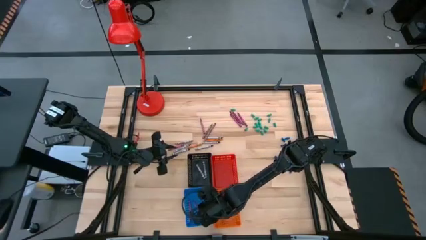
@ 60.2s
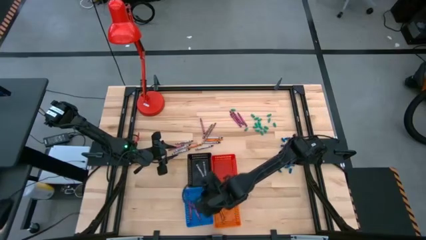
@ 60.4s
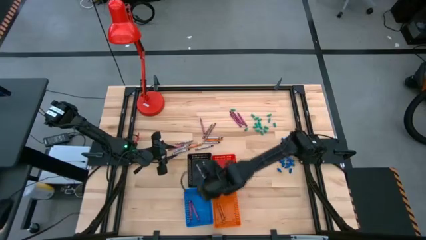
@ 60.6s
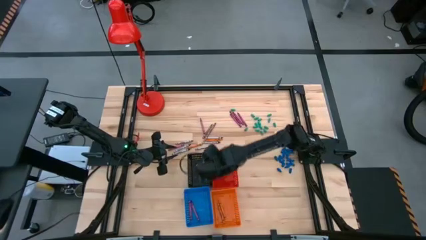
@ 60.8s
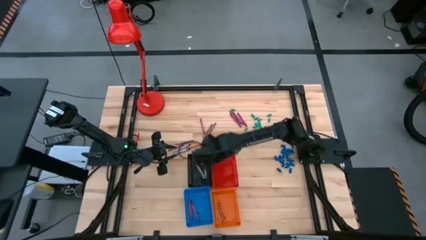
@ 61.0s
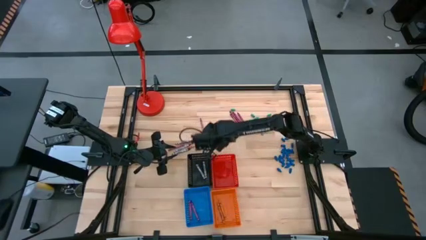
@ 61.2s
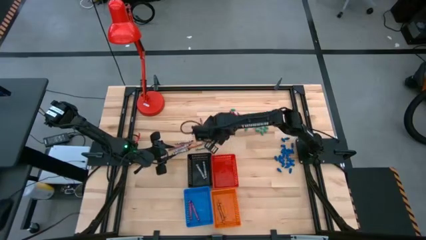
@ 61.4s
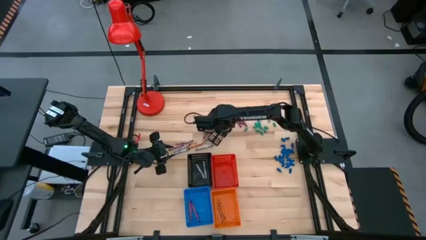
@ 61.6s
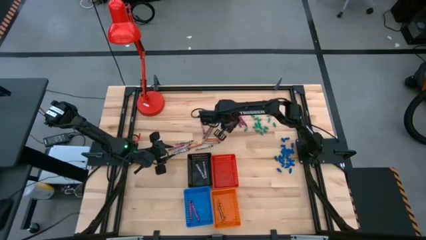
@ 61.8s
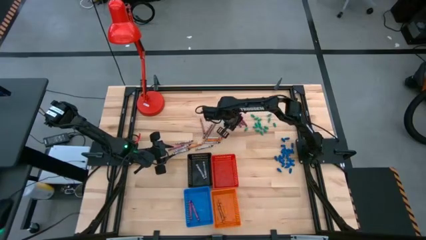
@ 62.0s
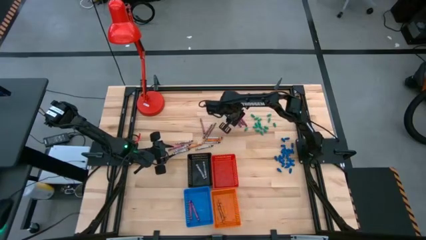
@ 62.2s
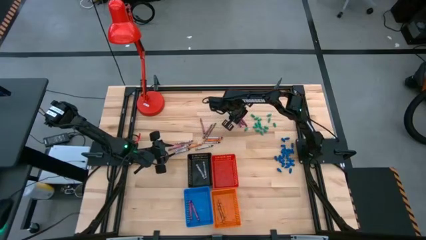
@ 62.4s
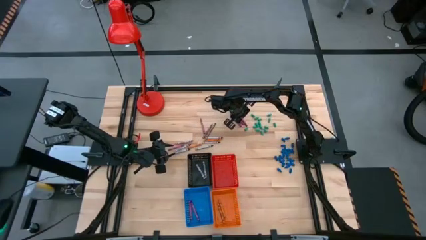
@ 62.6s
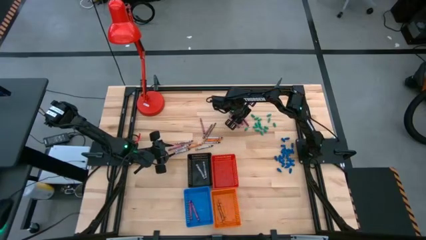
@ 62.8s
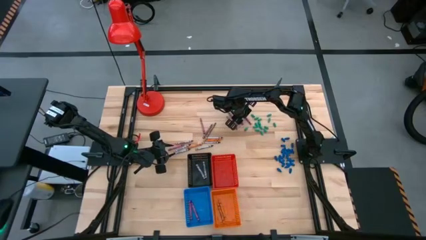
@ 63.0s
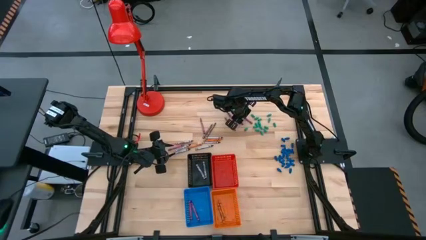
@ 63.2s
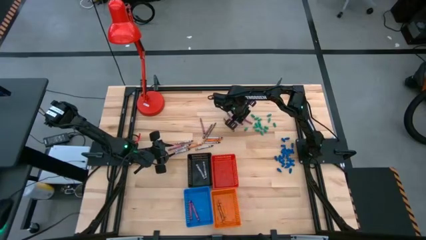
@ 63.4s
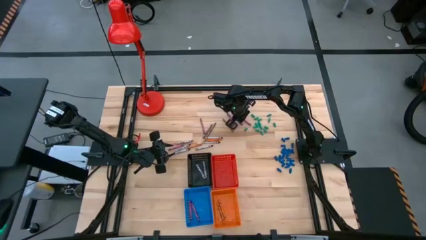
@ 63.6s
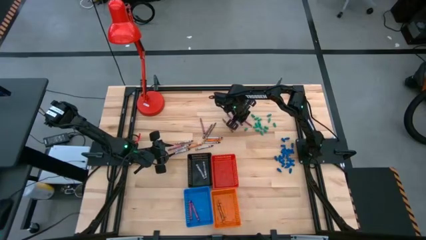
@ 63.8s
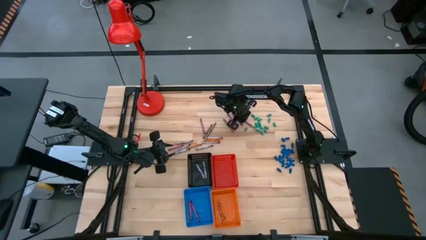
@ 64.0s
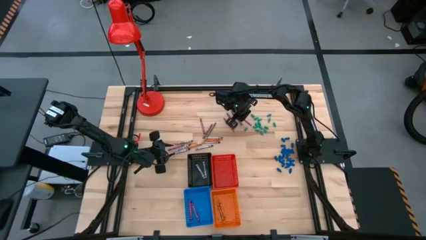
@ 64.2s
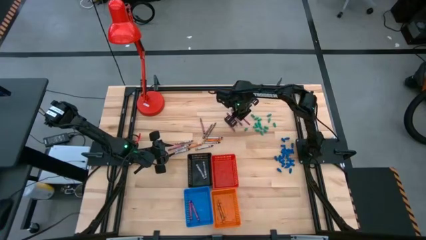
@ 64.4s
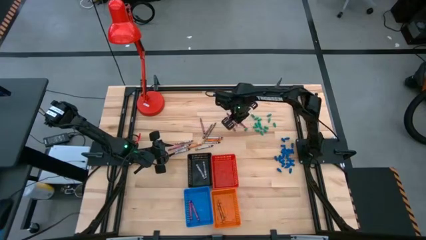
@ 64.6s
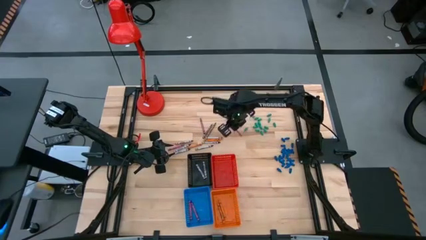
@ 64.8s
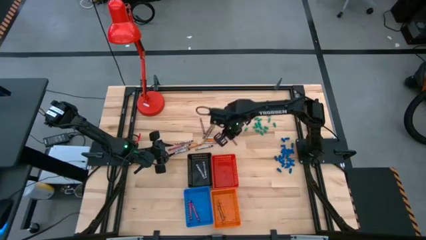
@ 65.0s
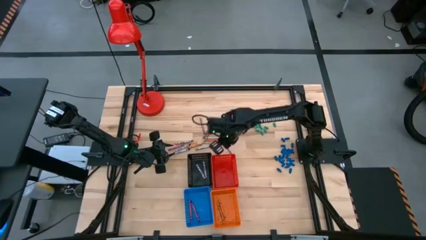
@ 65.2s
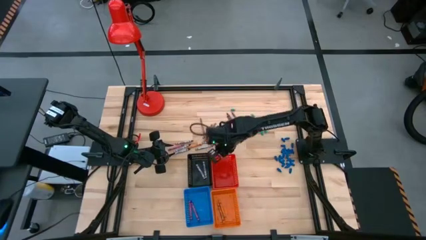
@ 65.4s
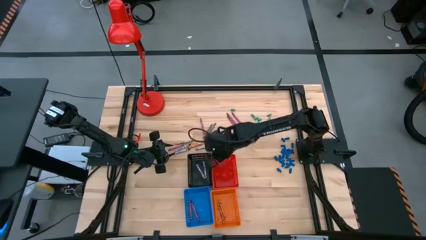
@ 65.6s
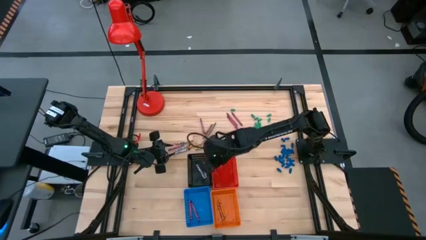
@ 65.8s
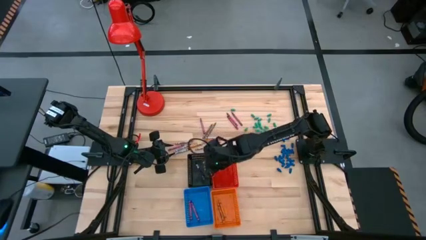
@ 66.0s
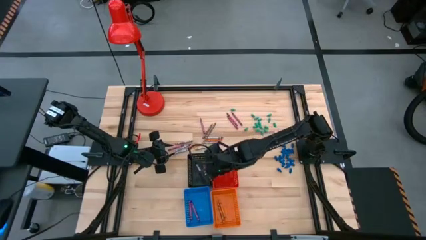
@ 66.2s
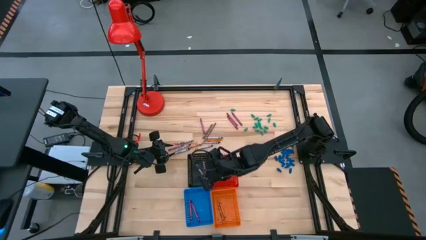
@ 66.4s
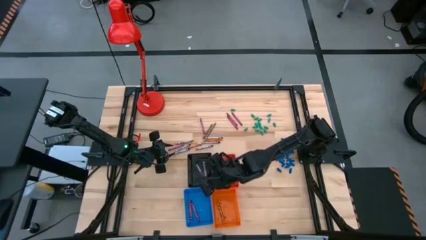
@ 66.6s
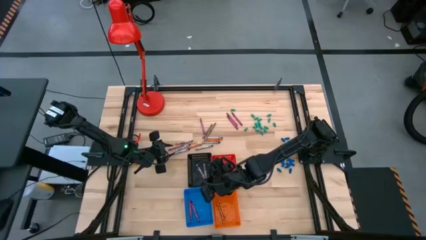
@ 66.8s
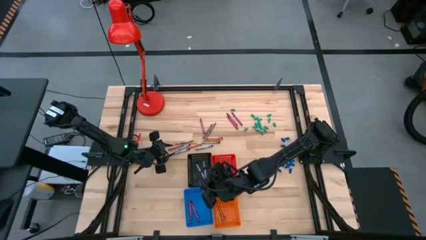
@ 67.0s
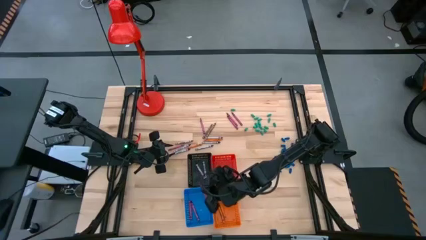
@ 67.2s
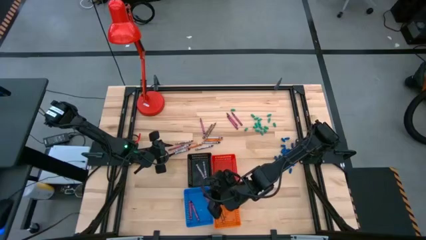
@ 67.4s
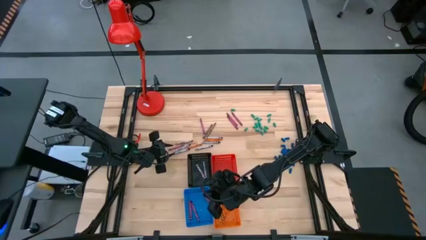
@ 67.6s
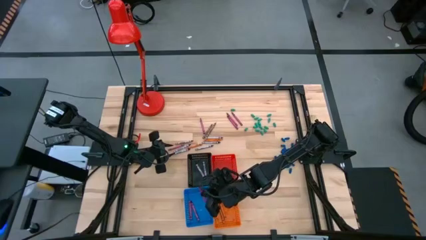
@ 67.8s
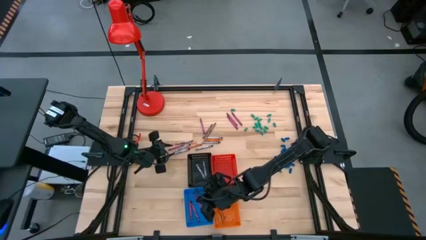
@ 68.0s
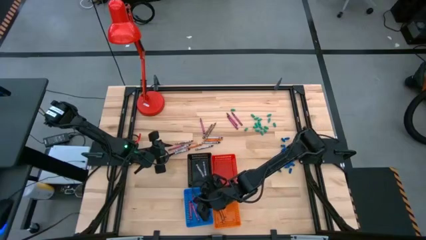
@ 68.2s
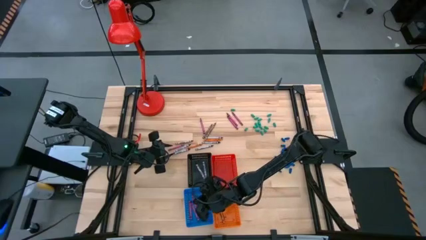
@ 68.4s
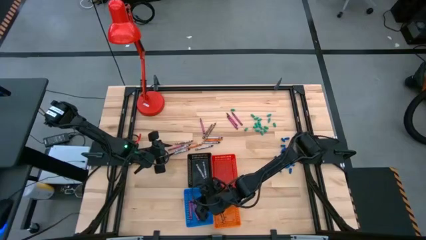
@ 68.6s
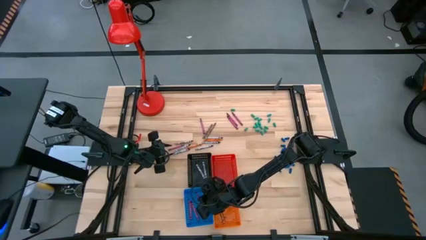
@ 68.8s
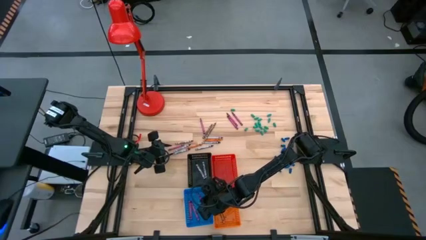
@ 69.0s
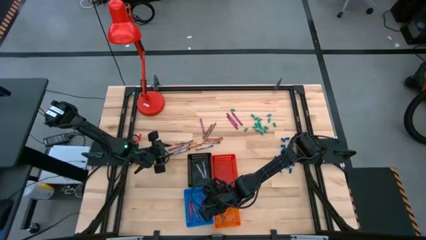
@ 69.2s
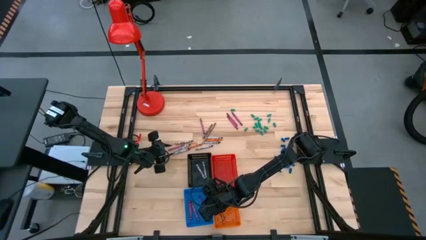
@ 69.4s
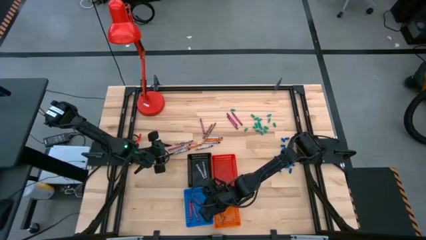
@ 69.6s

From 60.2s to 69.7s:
Task: Sort crayons
Put the red crayon into the blue basket

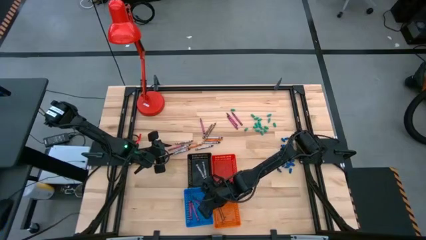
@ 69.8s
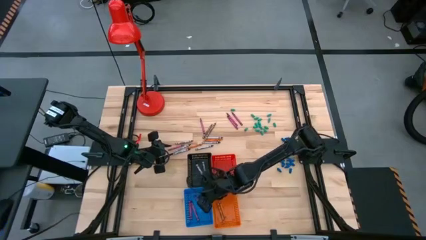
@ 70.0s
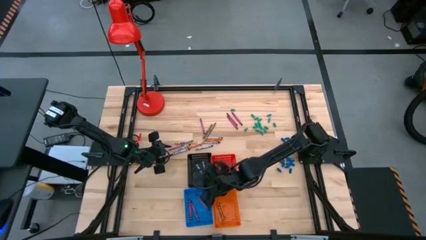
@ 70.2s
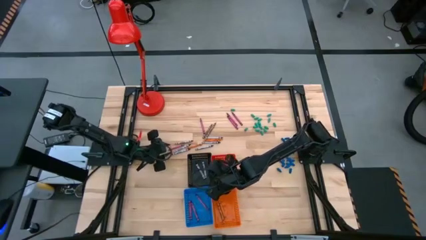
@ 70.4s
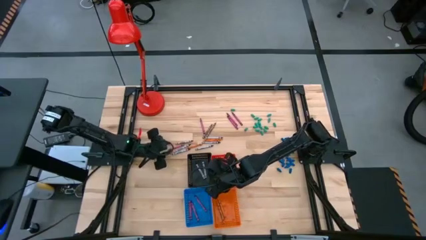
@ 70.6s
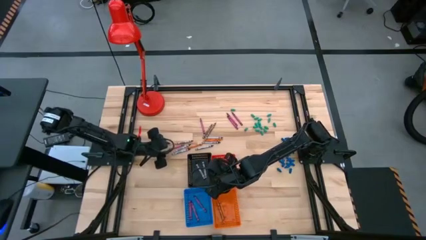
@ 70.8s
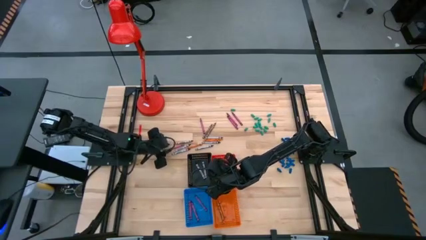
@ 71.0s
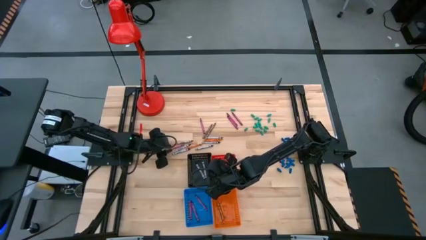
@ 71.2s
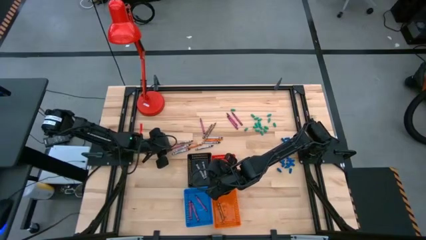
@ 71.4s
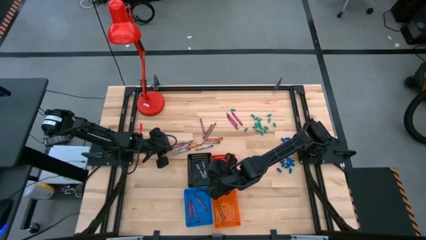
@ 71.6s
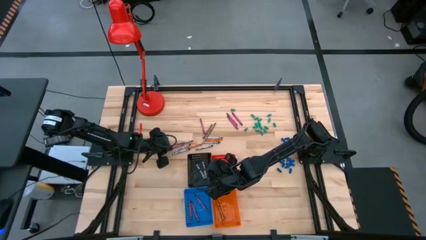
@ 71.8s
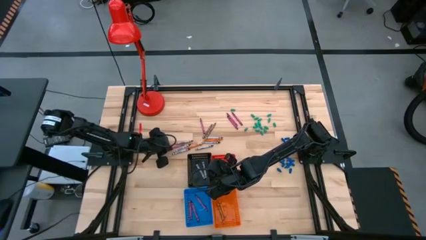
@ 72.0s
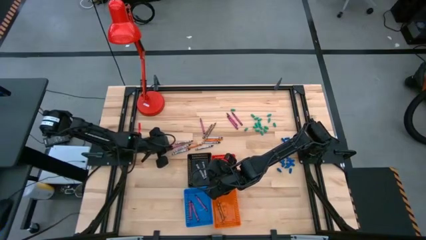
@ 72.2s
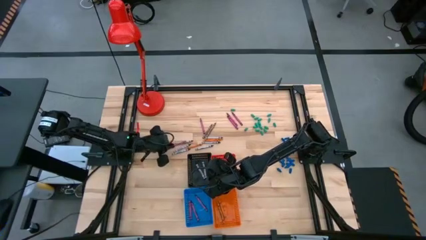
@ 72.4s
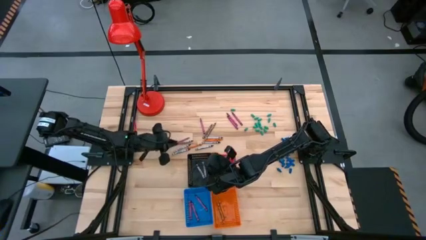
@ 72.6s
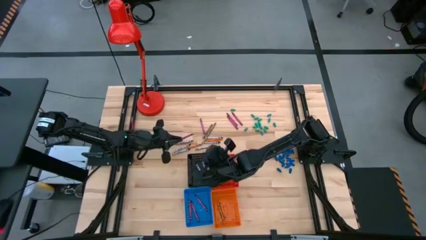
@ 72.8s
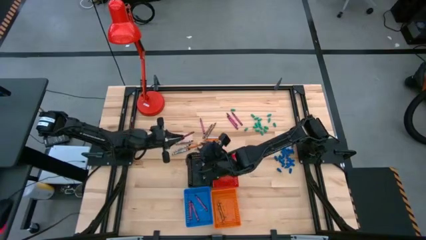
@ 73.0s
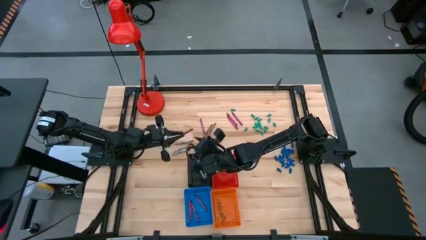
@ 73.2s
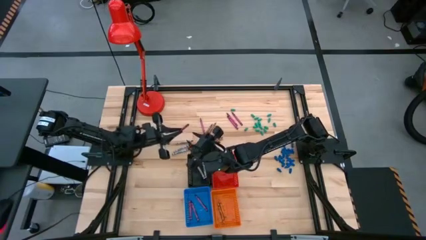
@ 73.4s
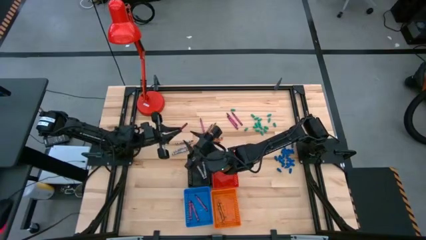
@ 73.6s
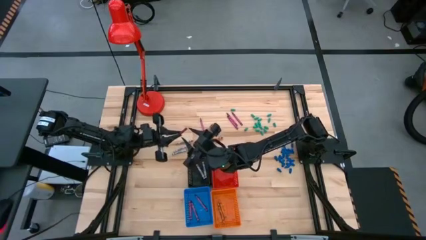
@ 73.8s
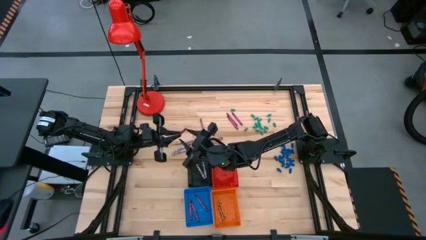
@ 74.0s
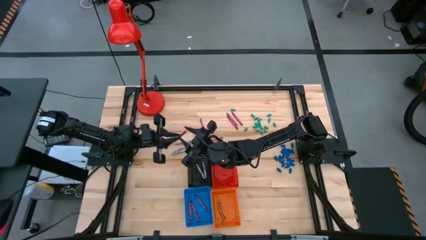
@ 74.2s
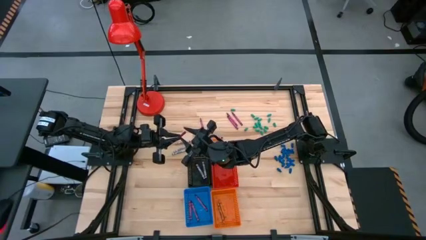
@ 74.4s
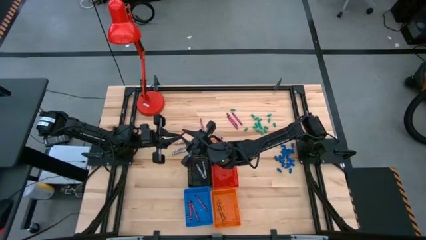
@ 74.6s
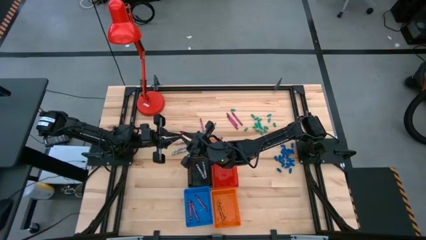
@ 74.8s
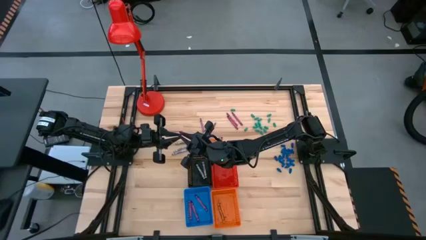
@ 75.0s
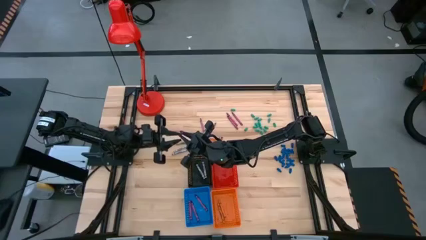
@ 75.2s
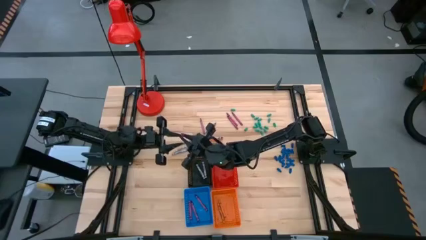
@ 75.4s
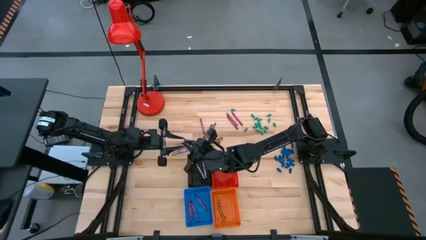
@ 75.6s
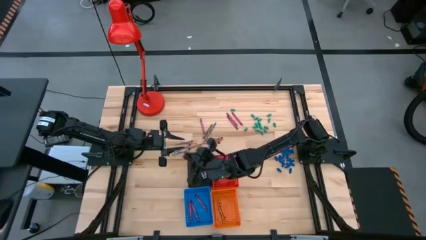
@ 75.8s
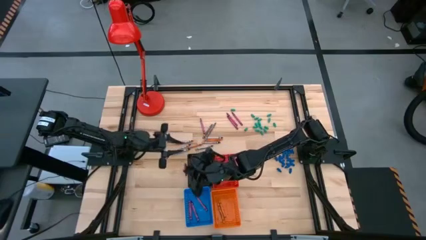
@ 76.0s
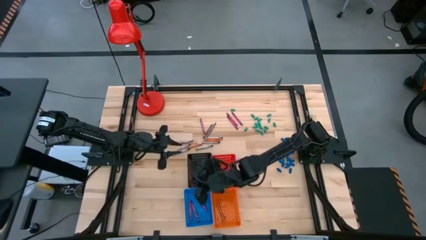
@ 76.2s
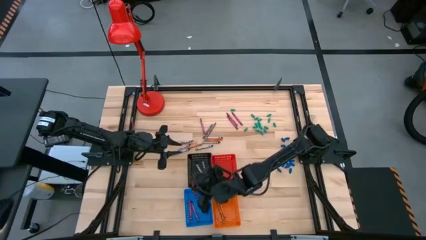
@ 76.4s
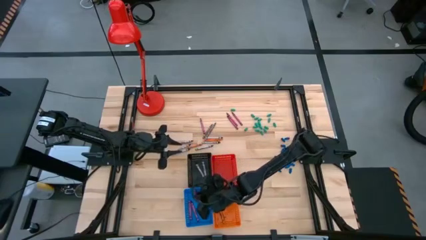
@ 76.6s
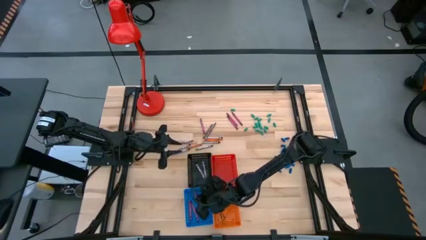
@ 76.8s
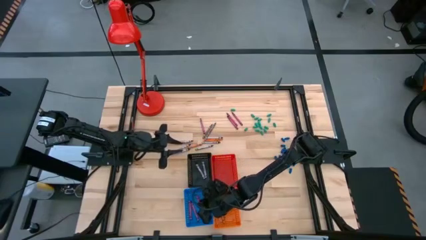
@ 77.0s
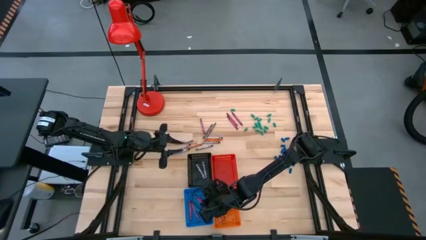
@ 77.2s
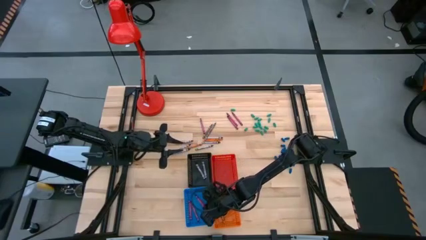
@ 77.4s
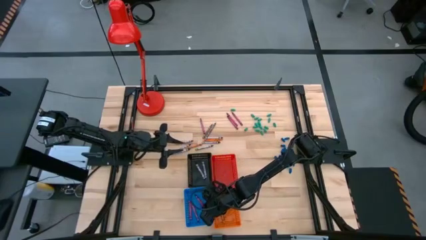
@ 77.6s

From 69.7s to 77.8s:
Put the red crayon into the blue basket
